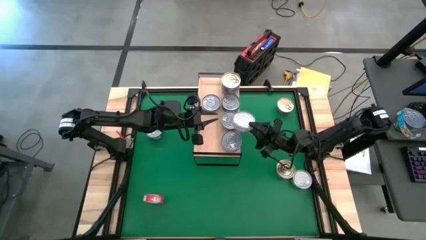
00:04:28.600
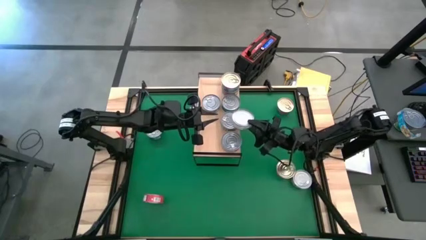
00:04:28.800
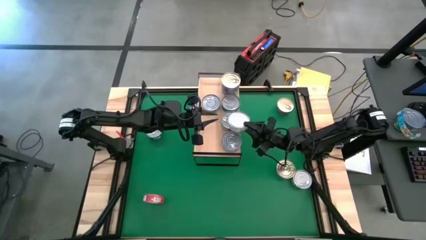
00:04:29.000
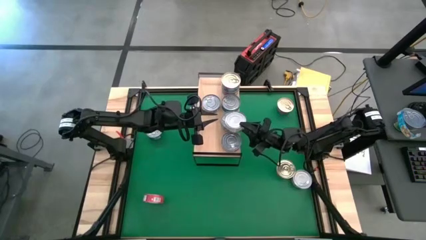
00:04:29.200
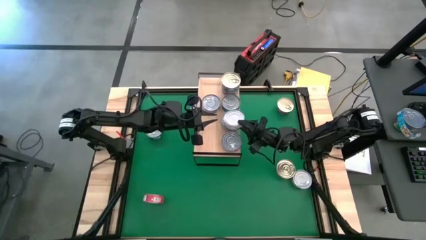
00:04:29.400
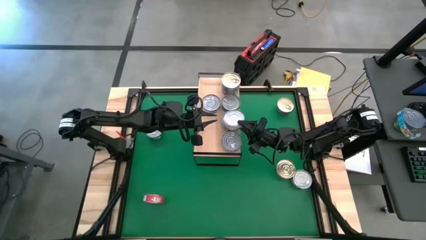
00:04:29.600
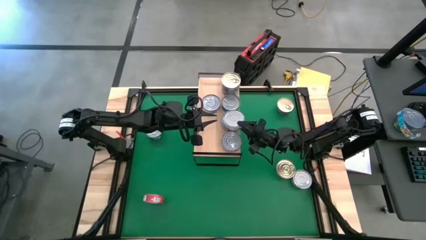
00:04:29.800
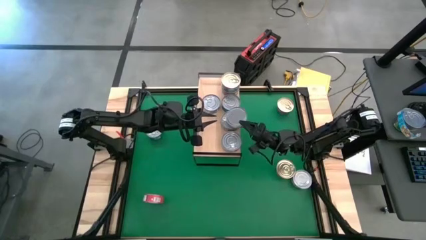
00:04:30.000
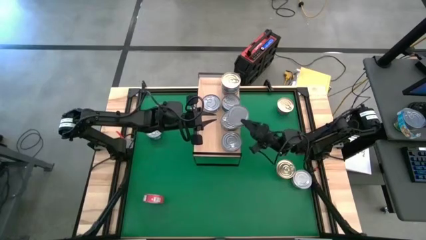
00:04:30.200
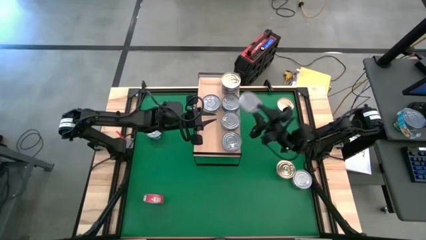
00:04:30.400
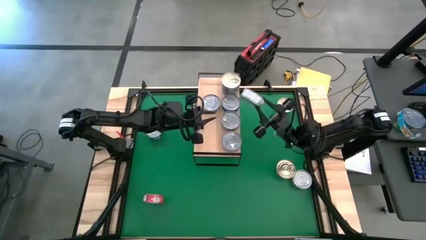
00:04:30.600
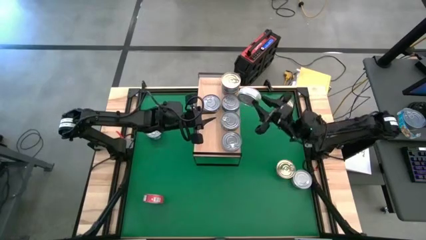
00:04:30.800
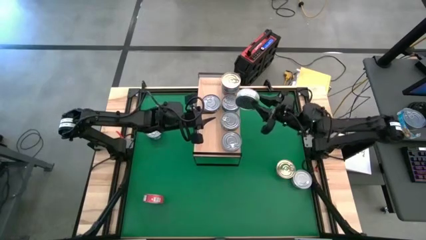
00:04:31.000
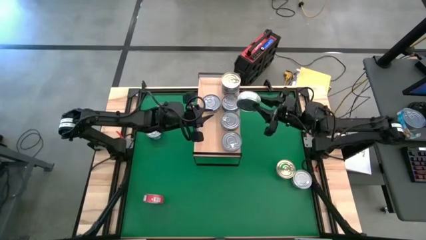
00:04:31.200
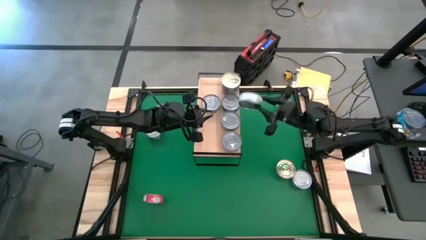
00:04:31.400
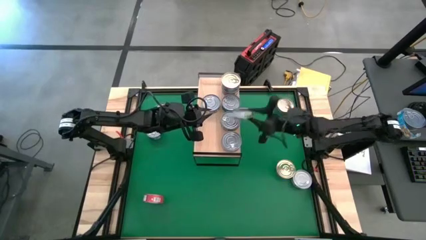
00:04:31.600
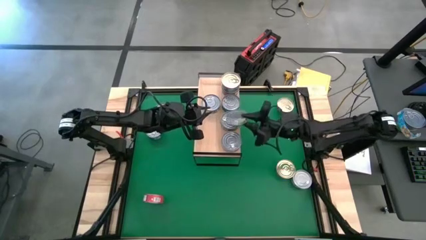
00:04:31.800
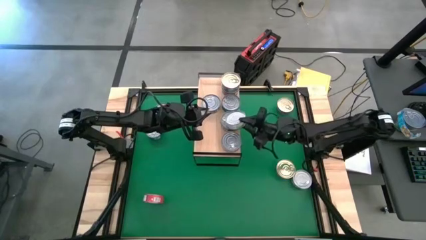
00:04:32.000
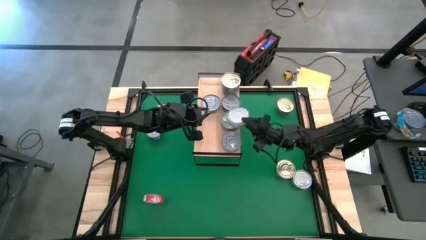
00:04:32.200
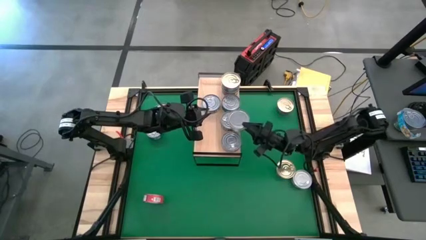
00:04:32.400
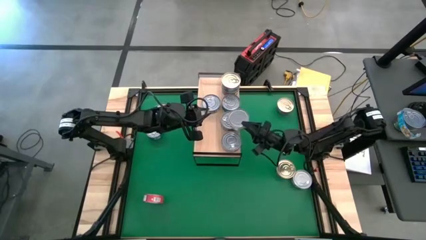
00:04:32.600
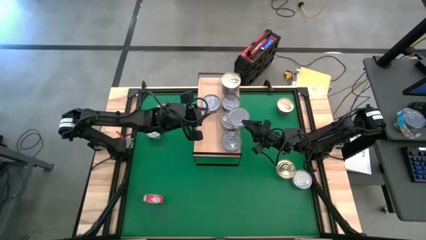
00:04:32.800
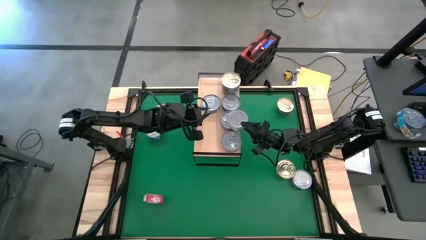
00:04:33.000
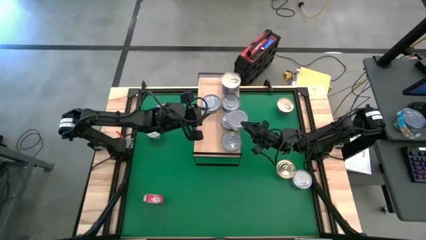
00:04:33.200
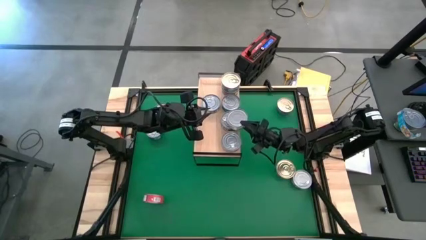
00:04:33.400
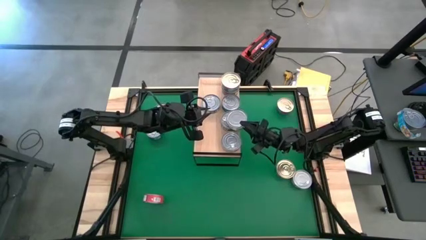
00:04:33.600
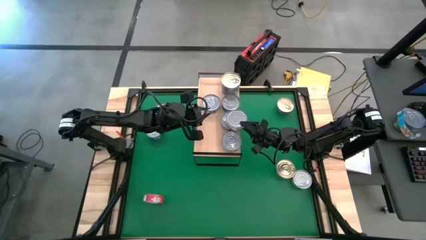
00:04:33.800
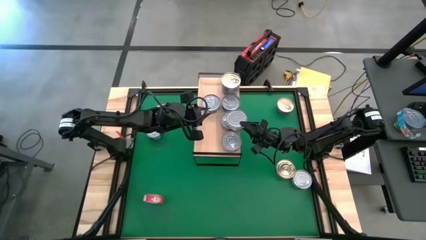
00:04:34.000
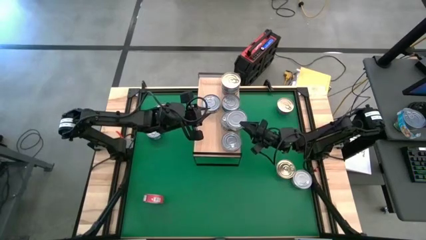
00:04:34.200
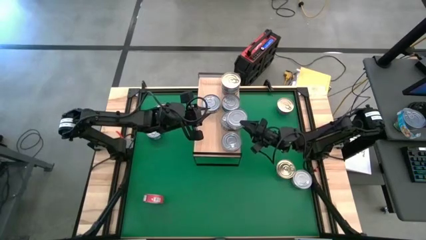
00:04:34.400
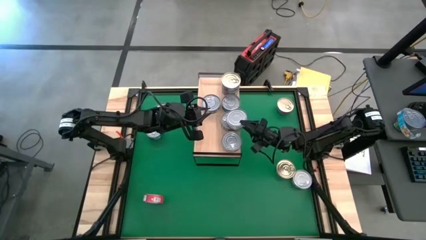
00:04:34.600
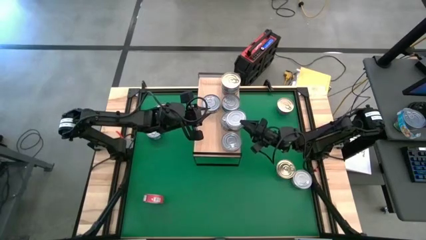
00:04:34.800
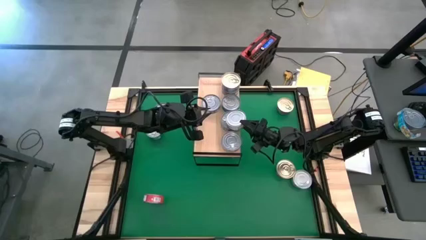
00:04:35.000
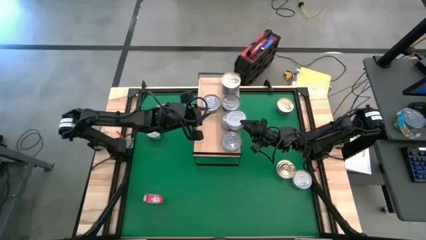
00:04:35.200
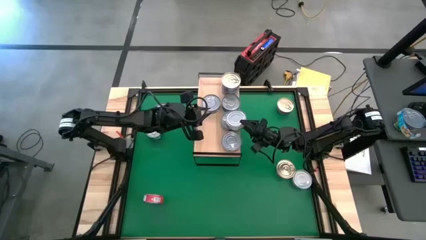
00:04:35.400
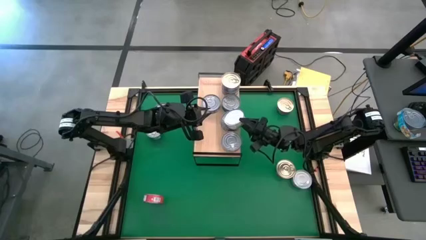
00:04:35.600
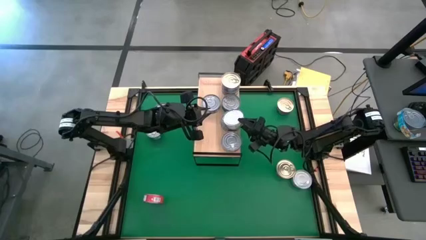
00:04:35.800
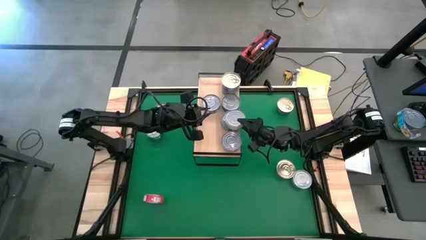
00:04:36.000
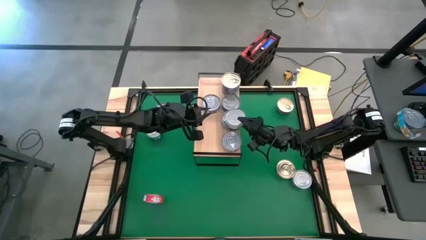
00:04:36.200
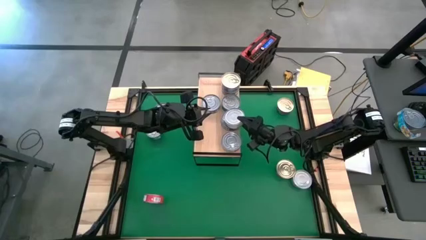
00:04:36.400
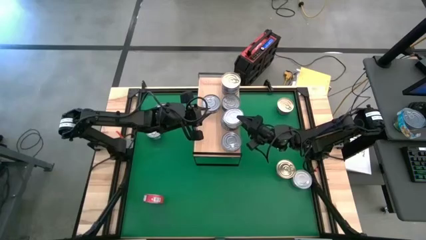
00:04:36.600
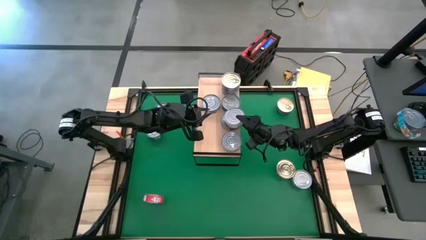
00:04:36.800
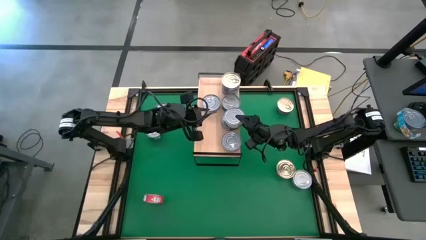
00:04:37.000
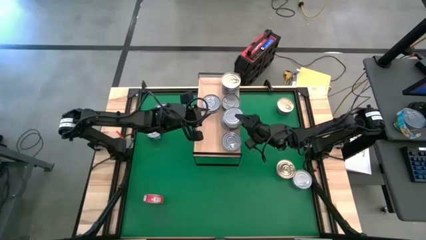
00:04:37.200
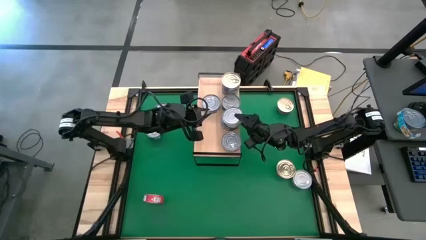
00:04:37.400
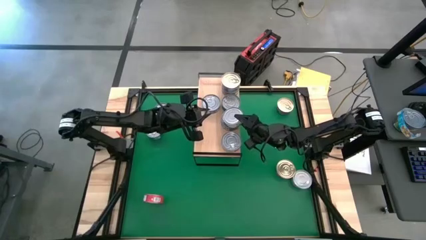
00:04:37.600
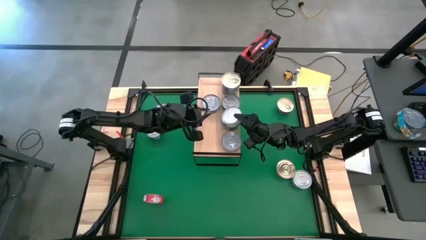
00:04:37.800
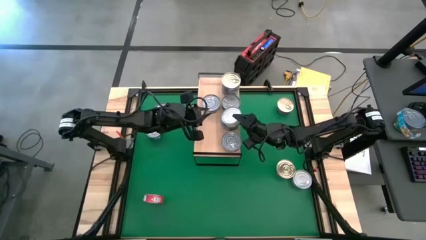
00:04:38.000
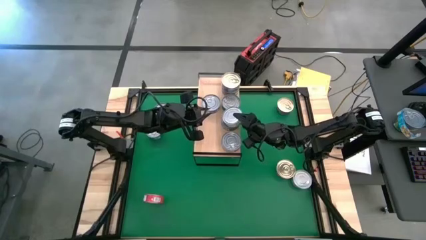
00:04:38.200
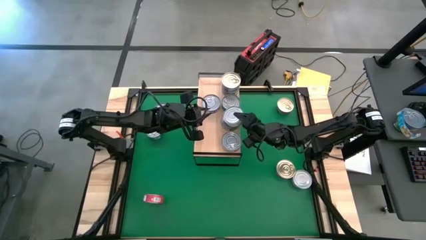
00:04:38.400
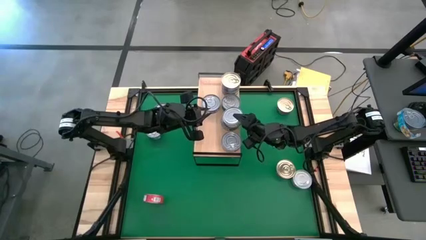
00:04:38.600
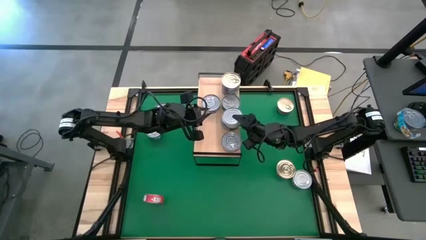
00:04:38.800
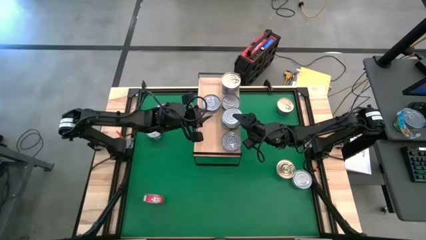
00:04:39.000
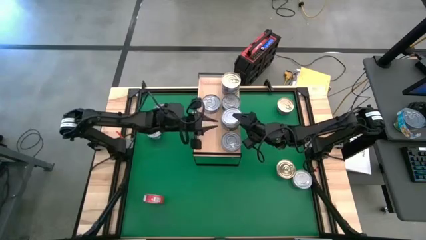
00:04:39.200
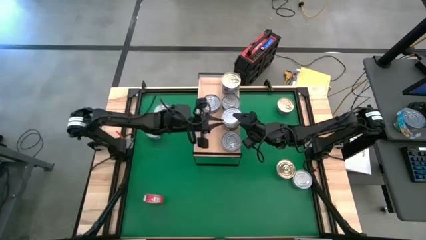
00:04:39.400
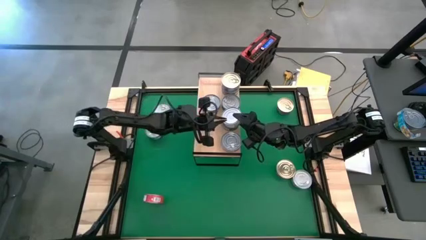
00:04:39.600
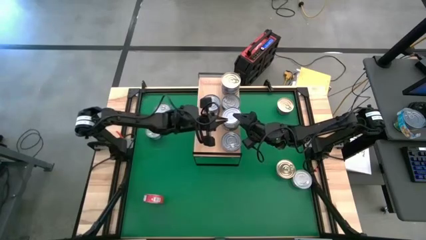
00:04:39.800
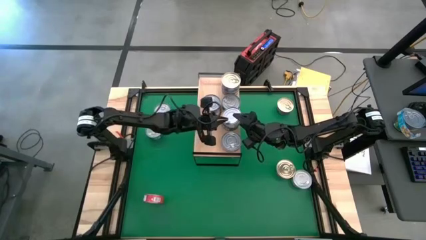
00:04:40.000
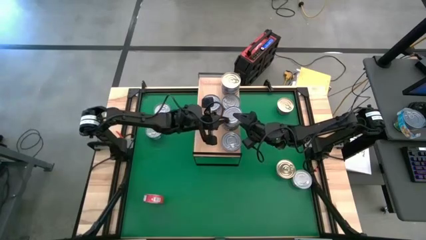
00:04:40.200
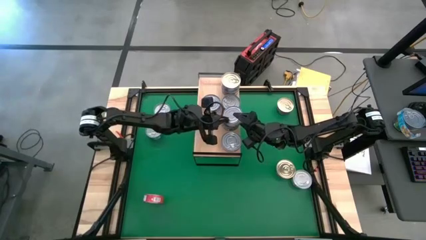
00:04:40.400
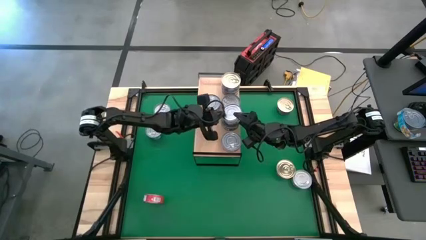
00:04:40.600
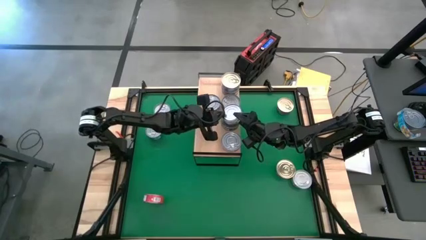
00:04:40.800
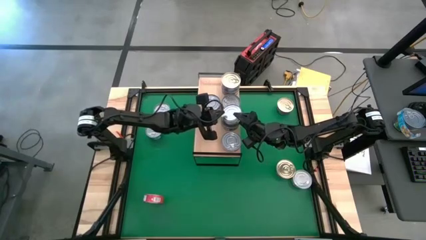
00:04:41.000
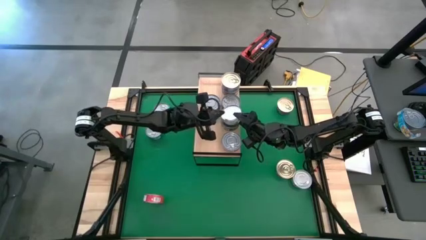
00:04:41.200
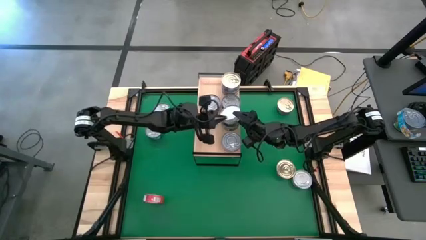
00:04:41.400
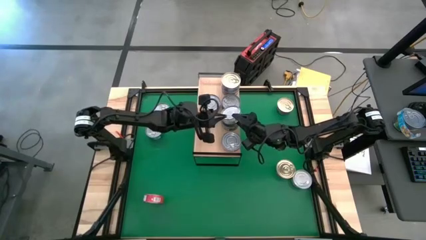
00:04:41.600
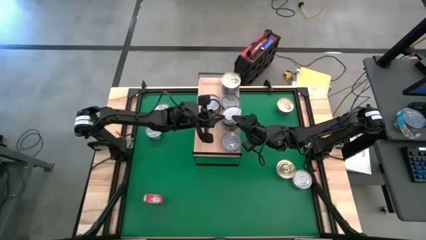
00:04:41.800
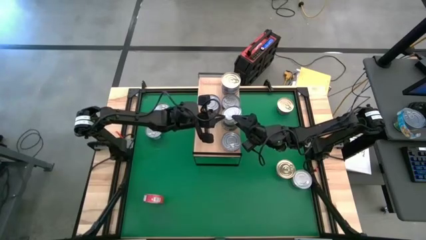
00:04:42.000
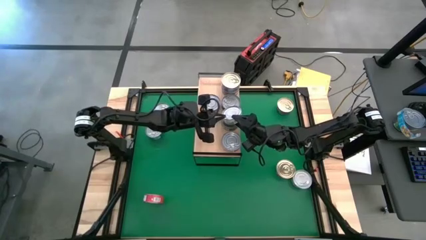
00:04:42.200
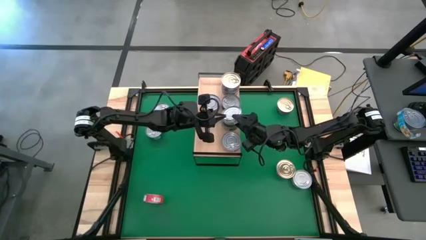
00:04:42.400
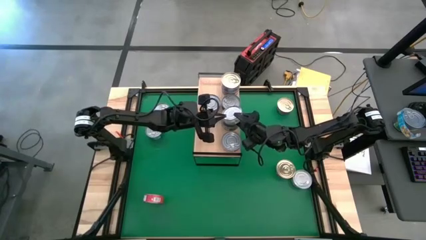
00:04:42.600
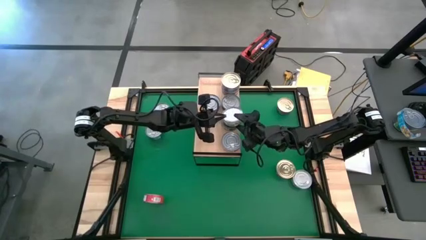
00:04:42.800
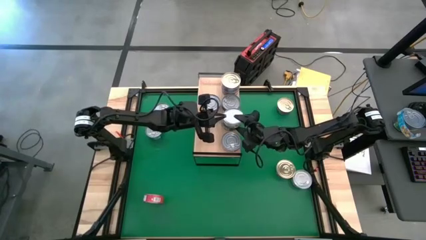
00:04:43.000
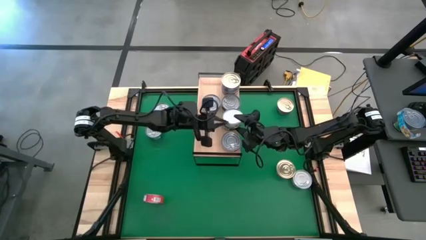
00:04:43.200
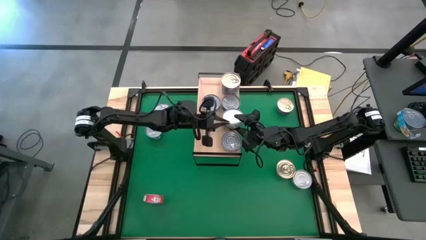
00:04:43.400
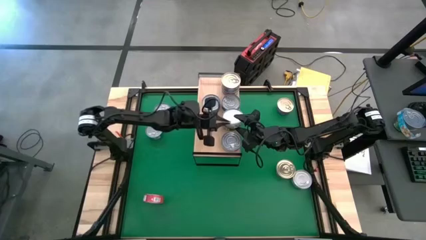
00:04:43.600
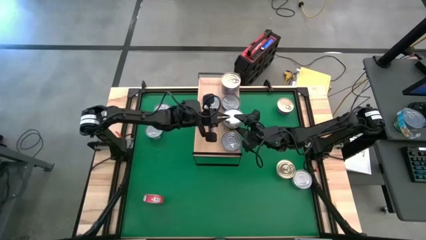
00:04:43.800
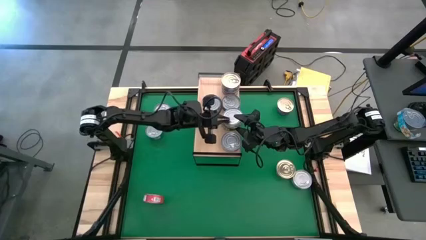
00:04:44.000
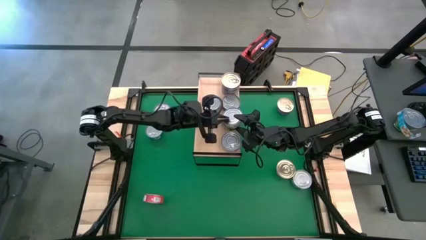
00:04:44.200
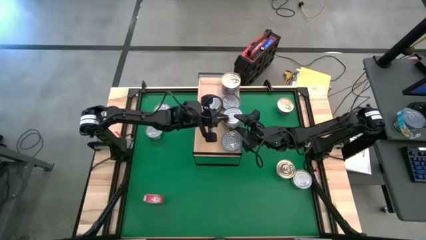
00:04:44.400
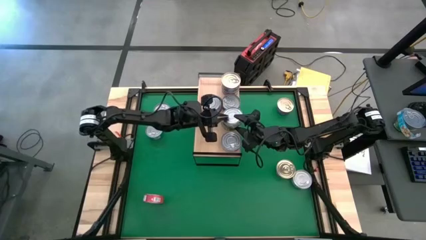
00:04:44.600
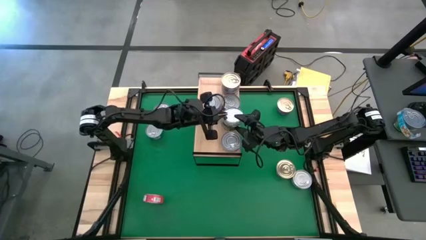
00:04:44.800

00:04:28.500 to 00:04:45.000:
Task: Stack canned seafood by type on shelf
Stack the top green tuna can on top of the green tuna can on the shelf
